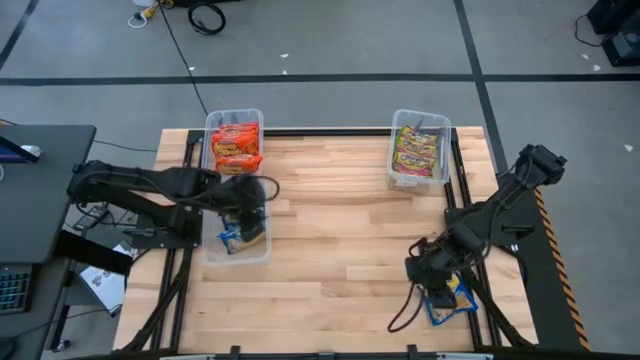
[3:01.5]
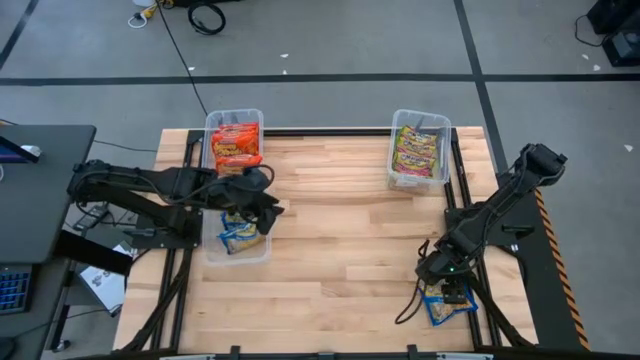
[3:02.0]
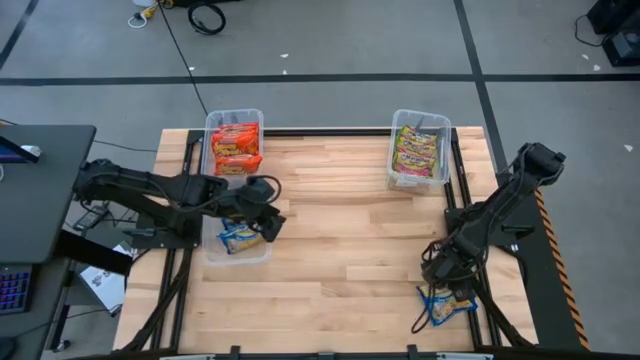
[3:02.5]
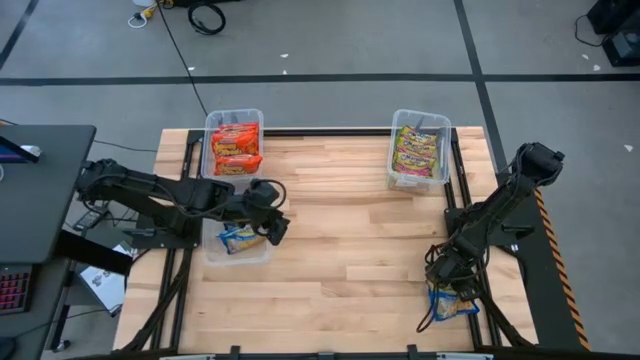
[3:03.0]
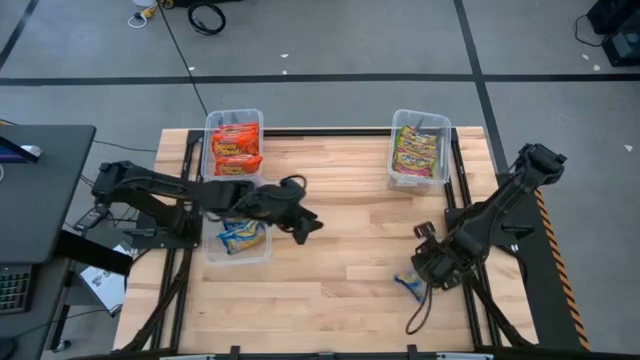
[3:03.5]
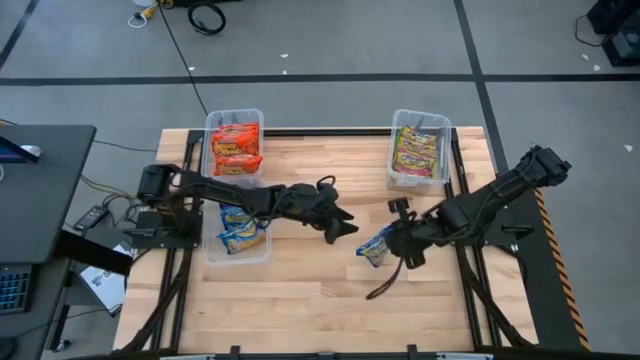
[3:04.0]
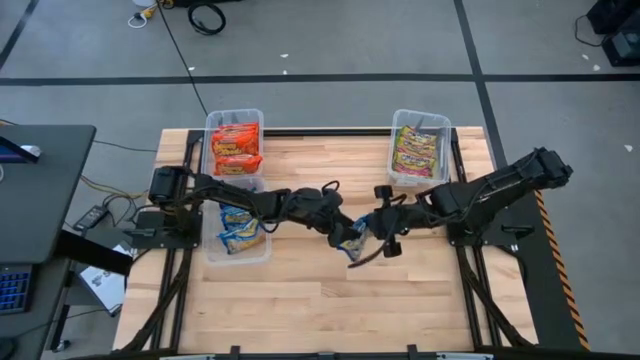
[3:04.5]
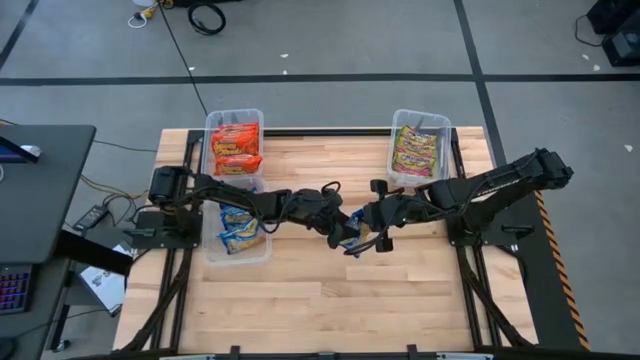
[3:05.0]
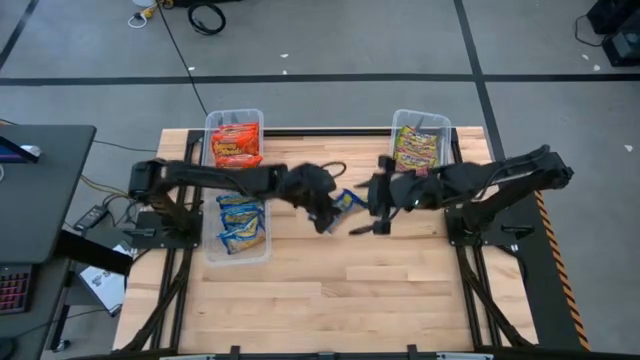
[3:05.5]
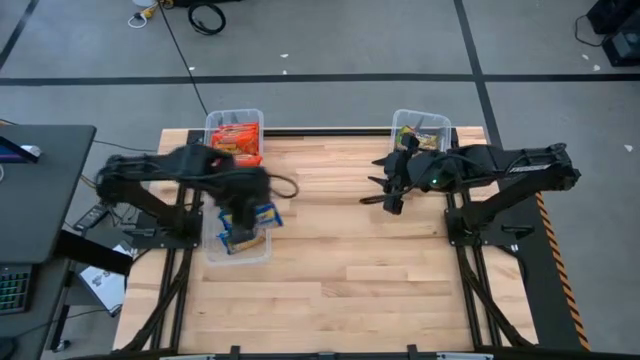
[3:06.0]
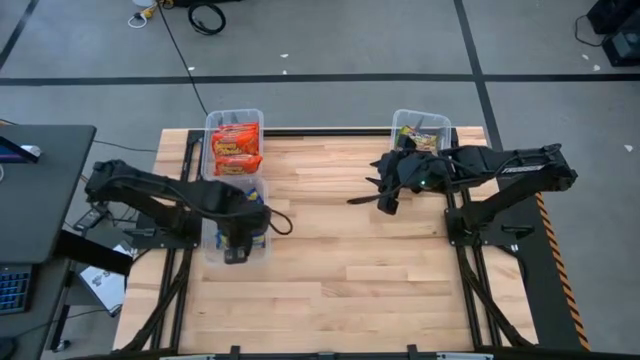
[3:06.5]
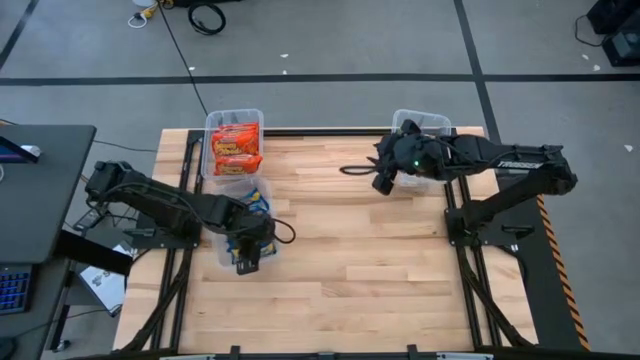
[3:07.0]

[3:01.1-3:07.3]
Task: Sort Maruchan noodles
Put the blue noodle pack into the bottom transparent bin

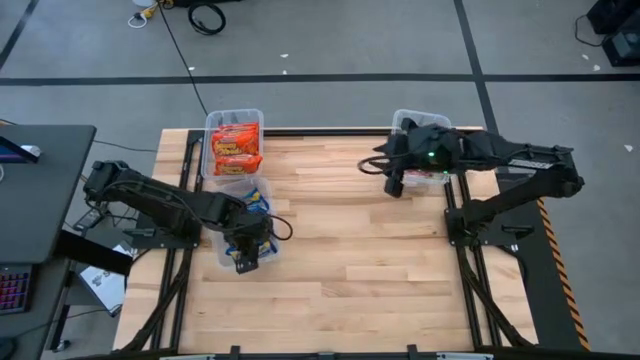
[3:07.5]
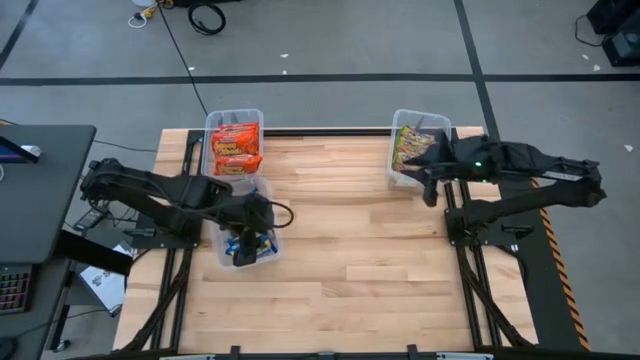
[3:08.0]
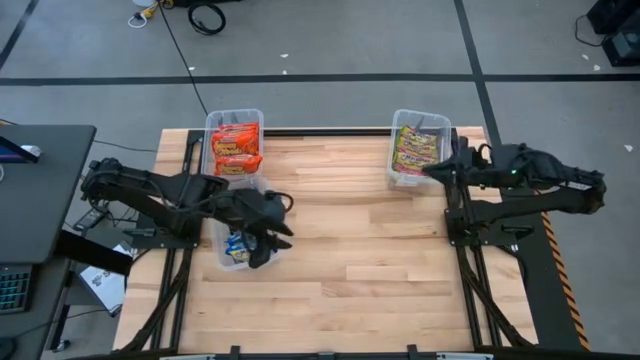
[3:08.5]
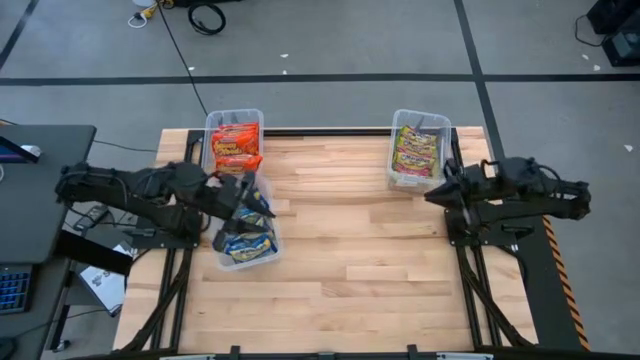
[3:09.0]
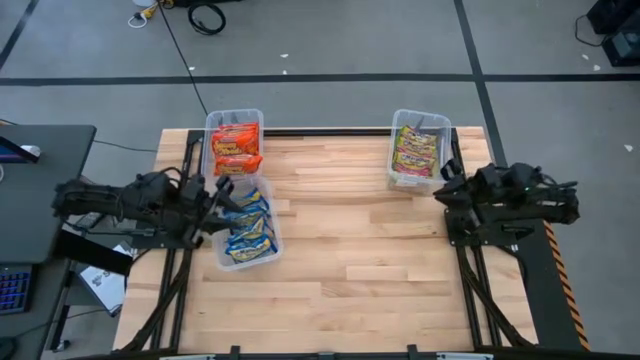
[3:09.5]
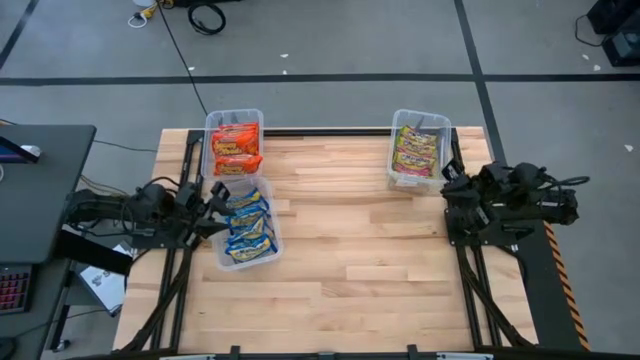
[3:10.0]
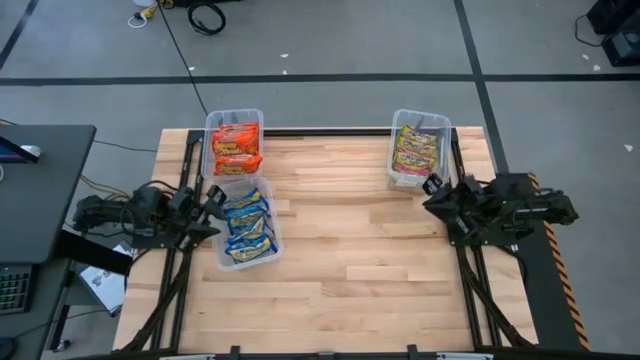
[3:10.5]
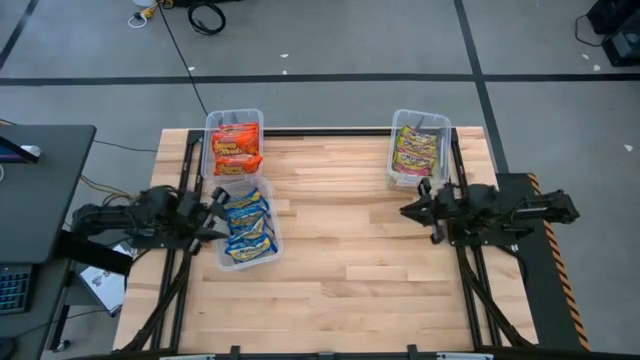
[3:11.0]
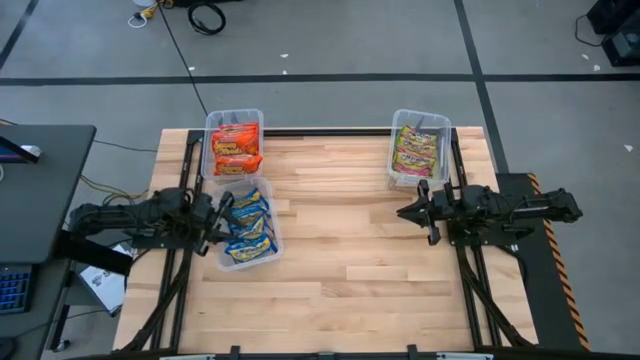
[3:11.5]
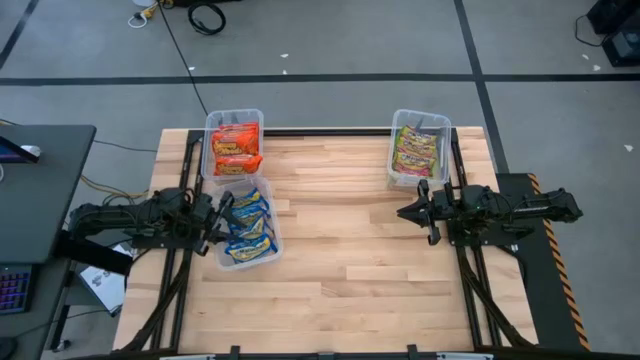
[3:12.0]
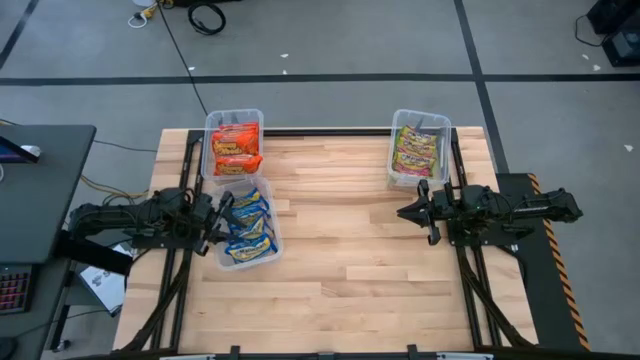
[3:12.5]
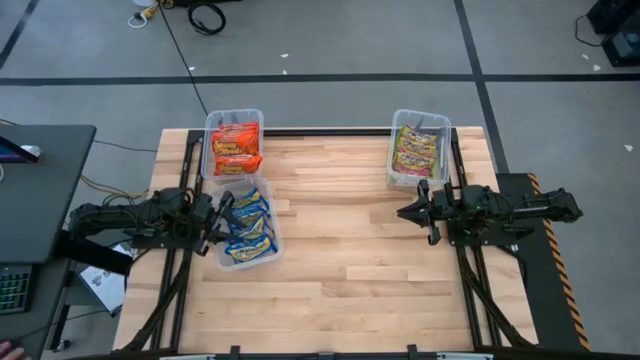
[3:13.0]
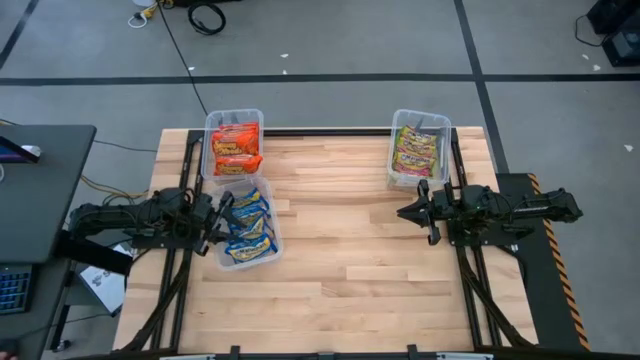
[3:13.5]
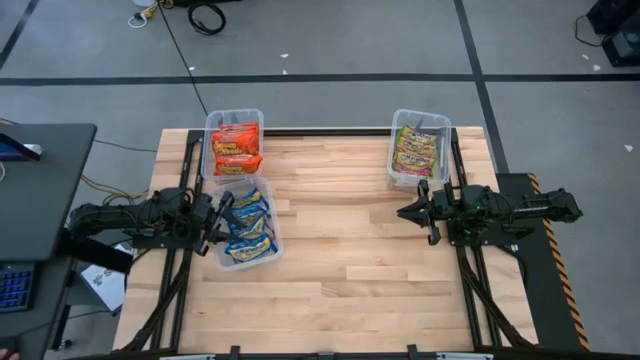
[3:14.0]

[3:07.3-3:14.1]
Return to Home Position

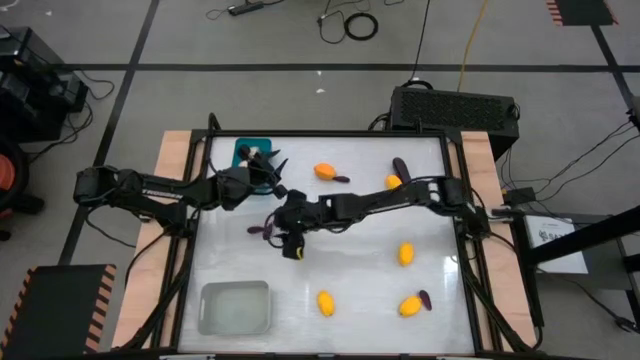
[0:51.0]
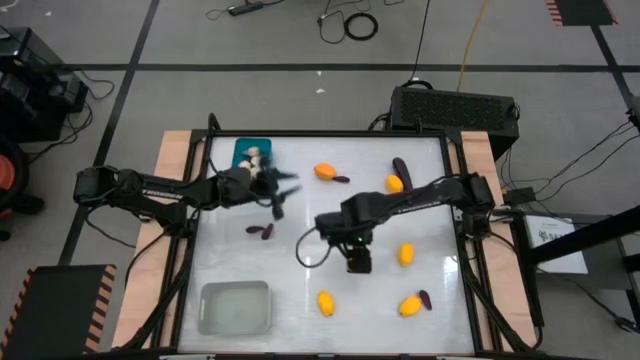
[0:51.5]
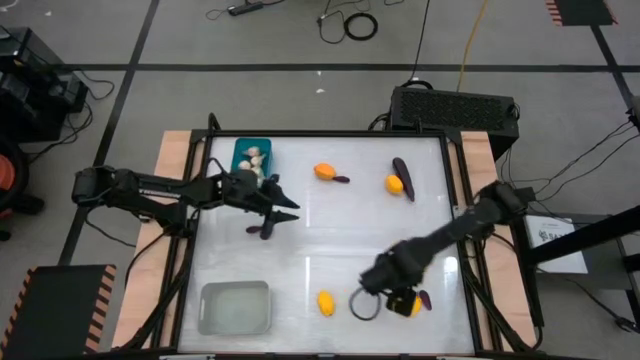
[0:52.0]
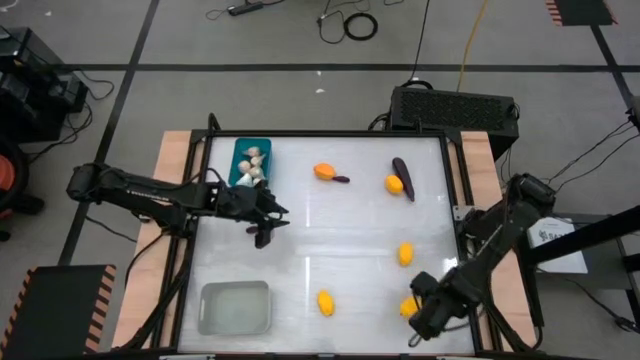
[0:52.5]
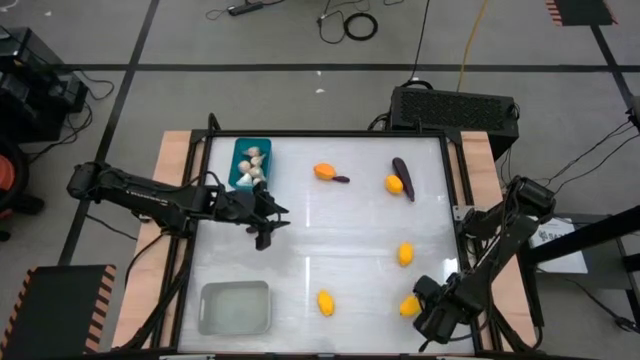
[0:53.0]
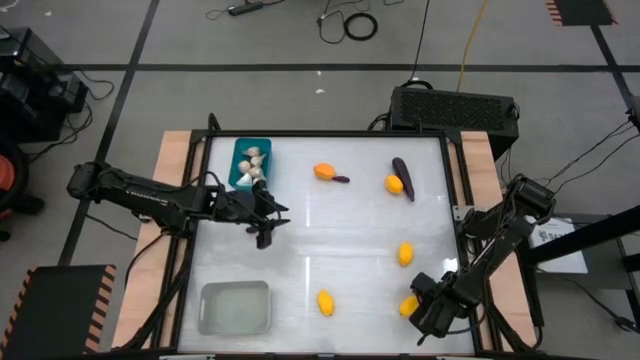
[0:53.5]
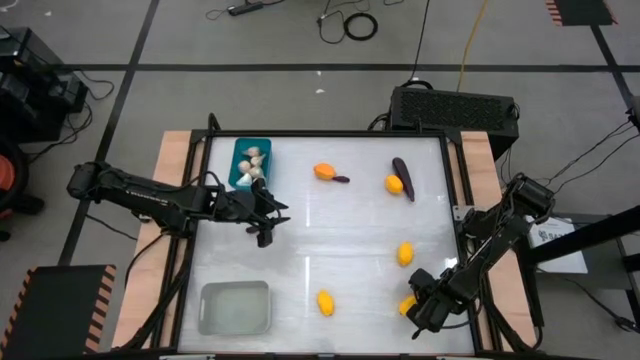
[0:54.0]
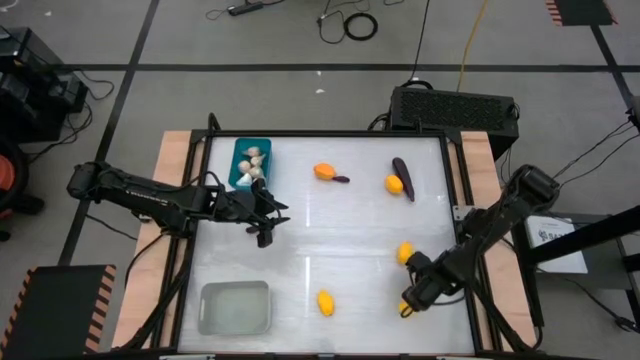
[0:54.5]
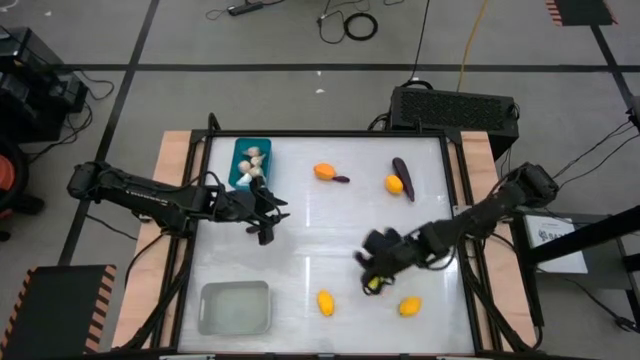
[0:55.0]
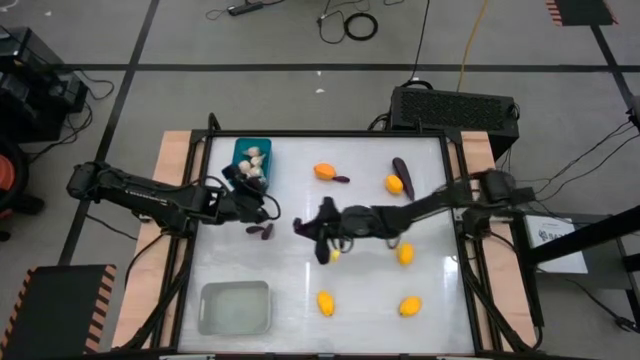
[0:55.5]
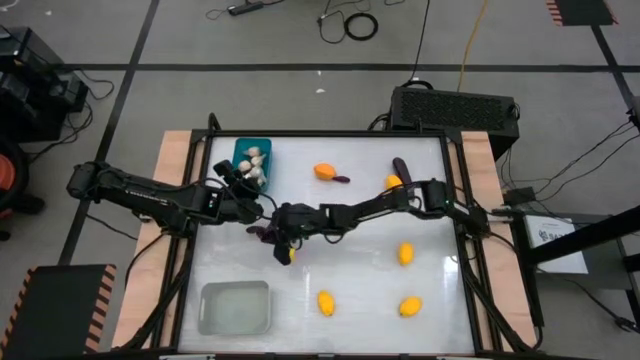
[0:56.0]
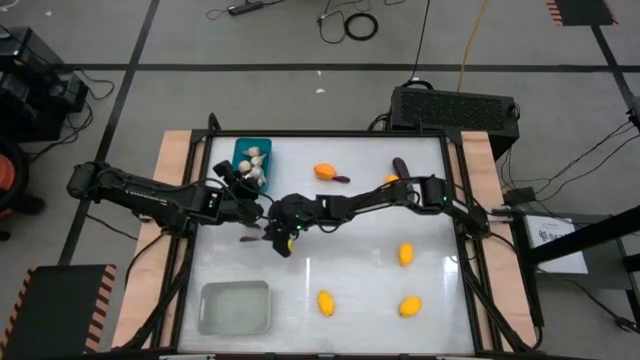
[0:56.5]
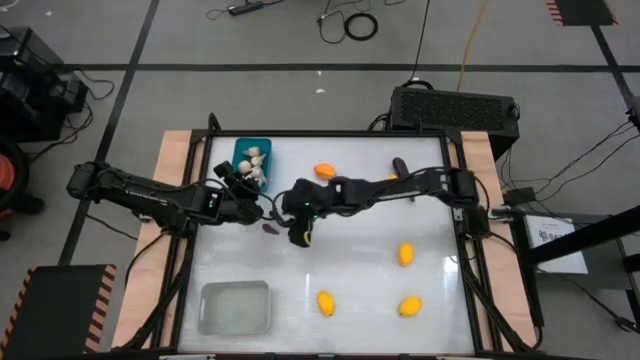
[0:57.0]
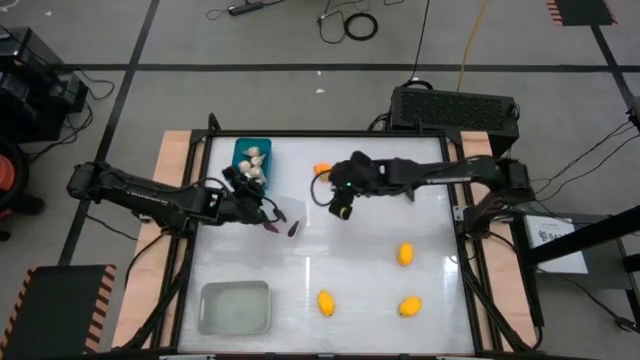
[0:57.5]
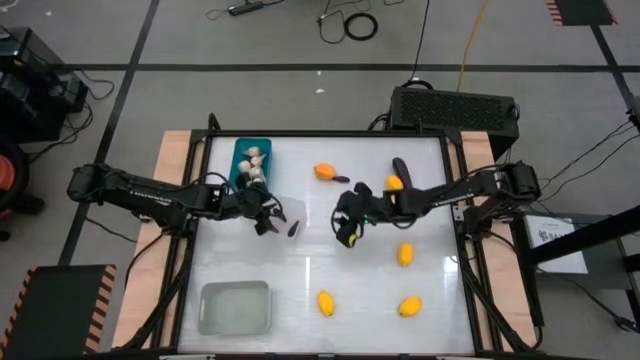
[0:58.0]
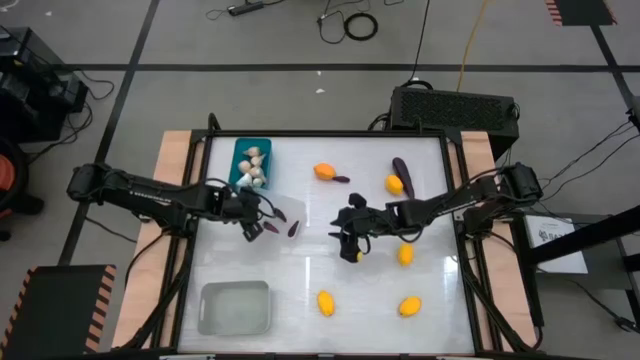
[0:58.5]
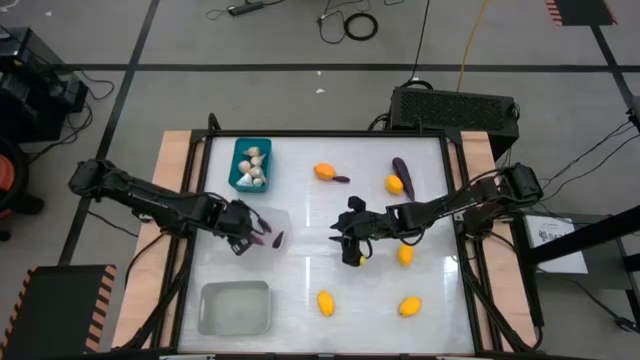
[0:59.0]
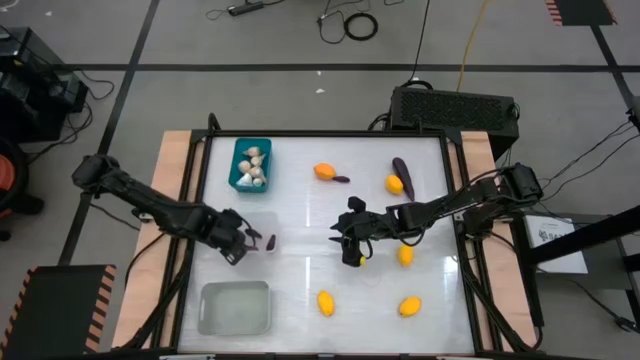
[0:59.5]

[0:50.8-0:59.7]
Task: Sort produce into baskets
Put the eggplant into the transparent bin
